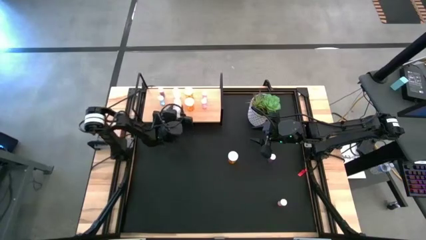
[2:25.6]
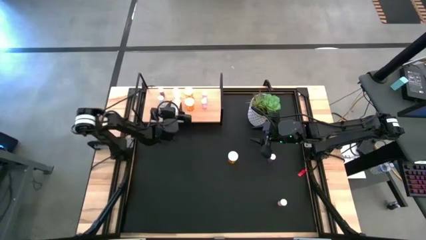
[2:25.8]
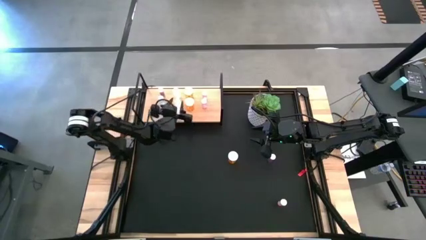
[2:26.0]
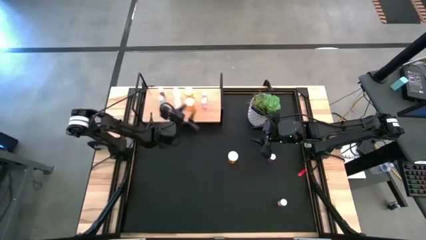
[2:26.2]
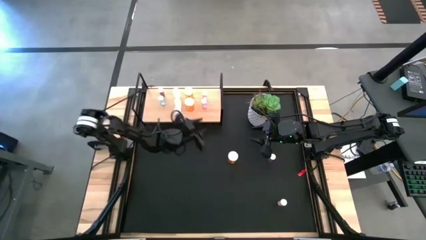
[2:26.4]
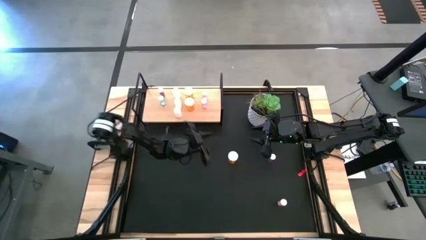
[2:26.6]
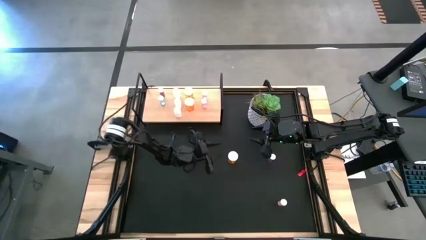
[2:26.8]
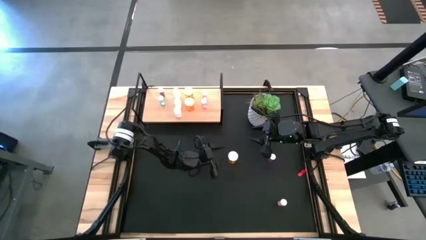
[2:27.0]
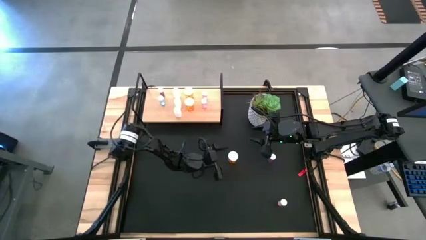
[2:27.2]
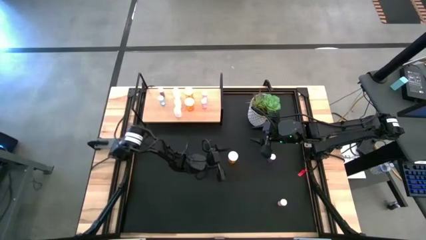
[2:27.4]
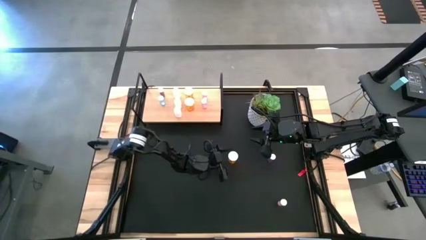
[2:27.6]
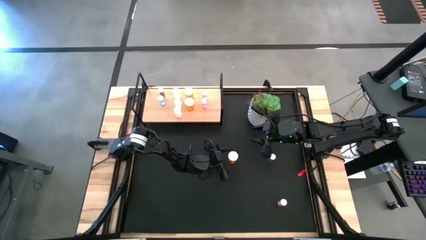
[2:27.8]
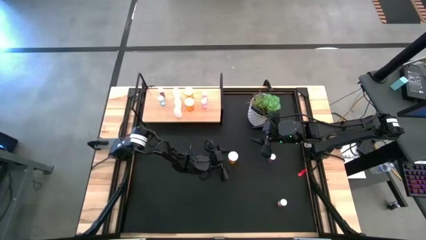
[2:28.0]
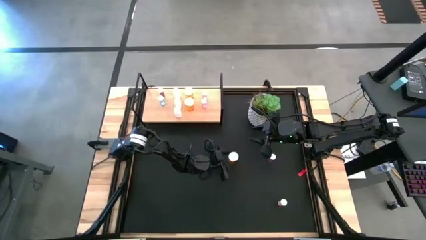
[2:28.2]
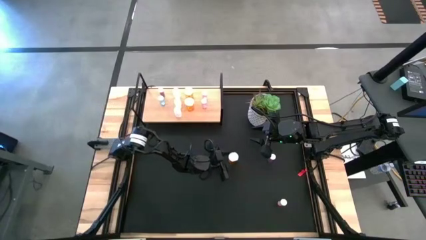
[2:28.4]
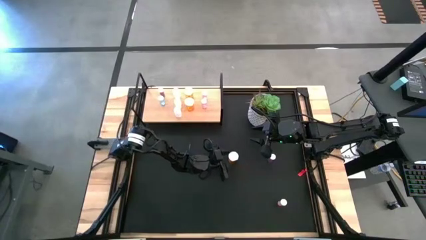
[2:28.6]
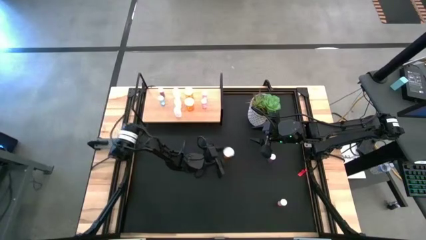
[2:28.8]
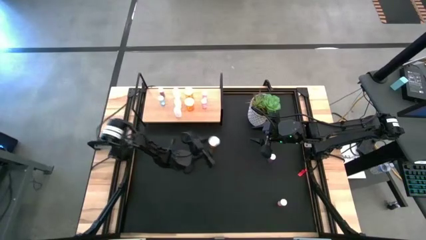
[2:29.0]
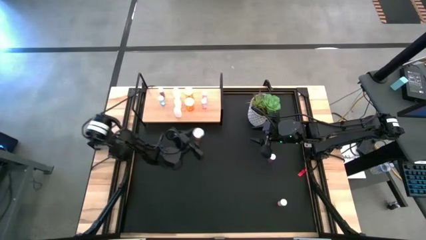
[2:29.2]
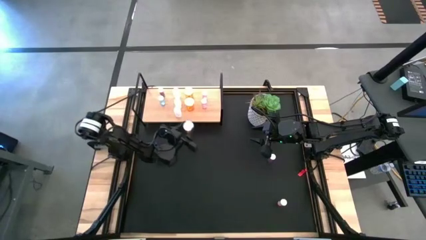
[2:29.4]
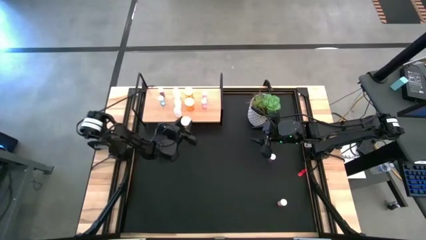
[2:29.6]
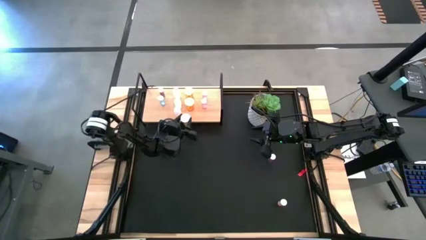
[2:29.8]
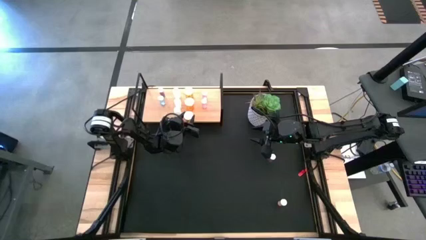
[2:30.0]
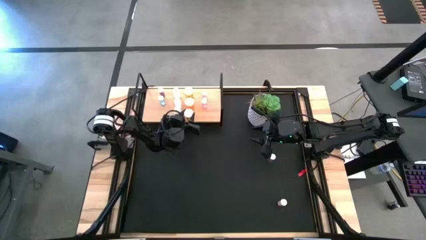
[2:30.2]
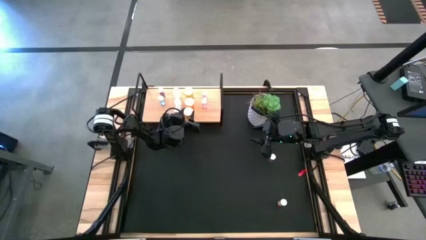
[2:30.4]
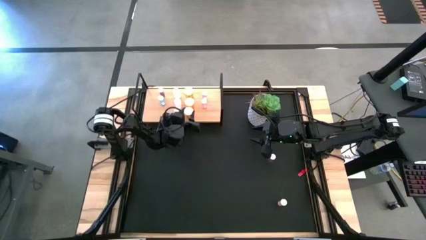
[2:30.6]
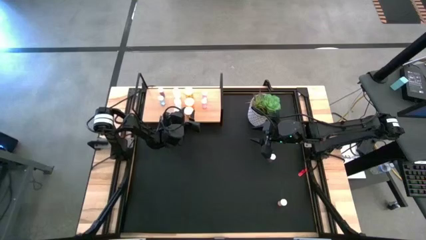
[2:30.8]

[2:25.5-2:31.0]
Task: Pick and place medicine bottles onto shelf by color
Put the orange pill bottle on the shelf aligned with the other orange pill bottles

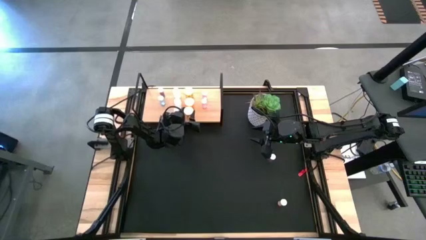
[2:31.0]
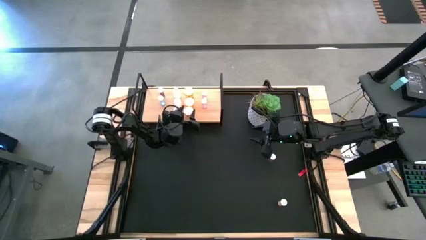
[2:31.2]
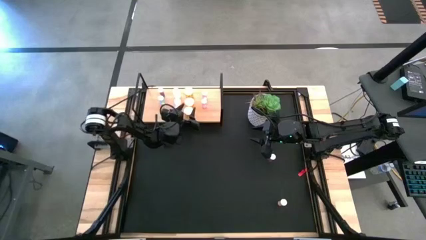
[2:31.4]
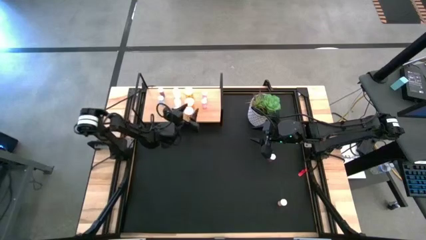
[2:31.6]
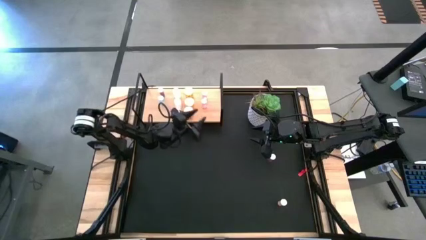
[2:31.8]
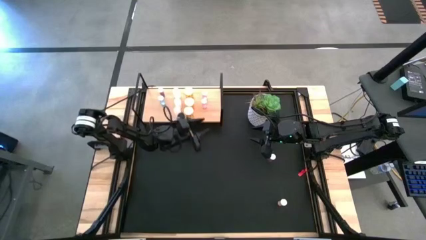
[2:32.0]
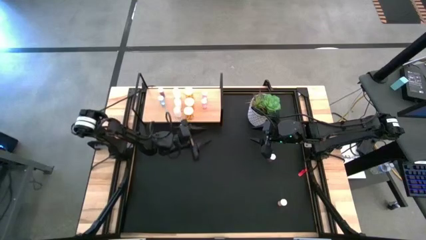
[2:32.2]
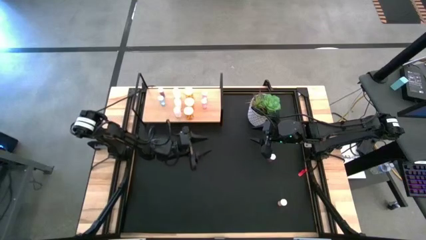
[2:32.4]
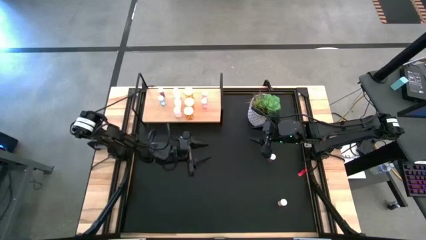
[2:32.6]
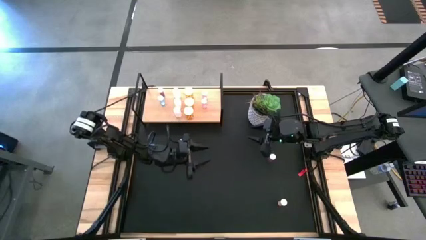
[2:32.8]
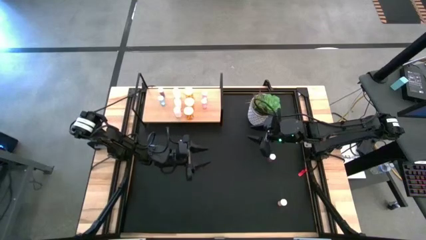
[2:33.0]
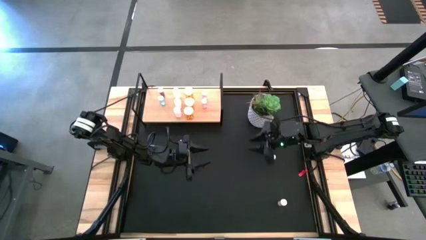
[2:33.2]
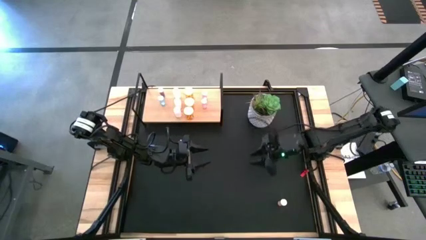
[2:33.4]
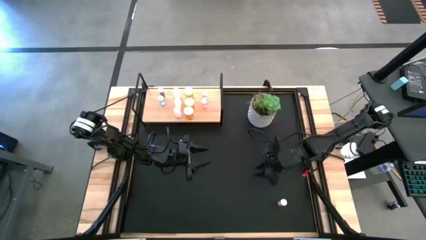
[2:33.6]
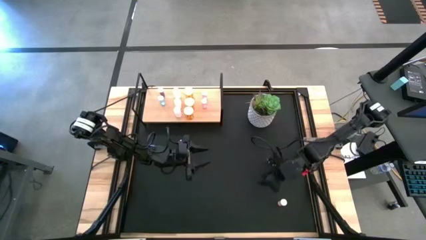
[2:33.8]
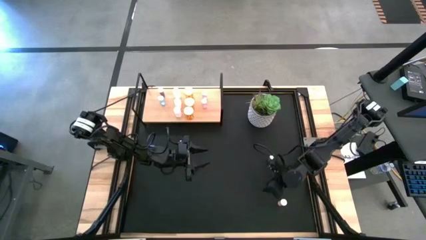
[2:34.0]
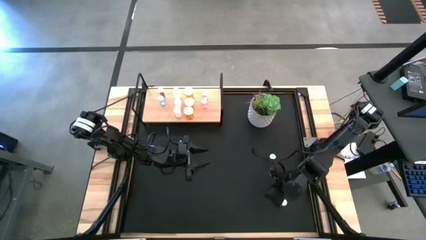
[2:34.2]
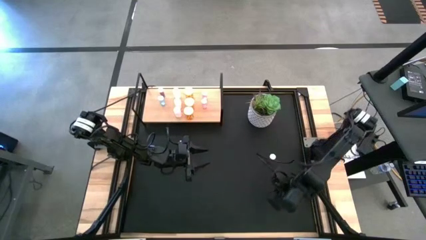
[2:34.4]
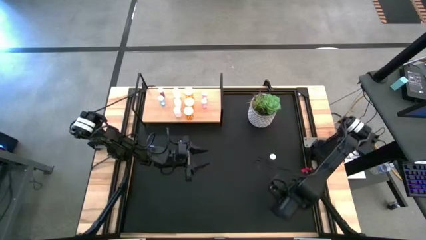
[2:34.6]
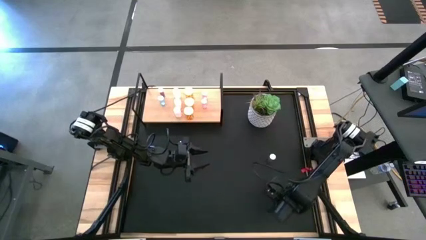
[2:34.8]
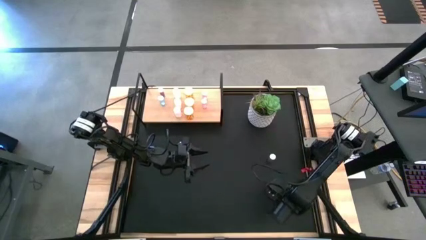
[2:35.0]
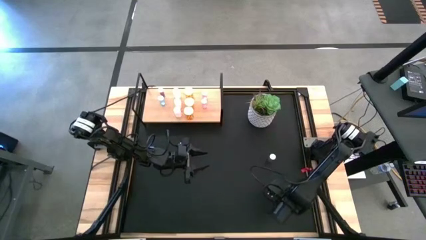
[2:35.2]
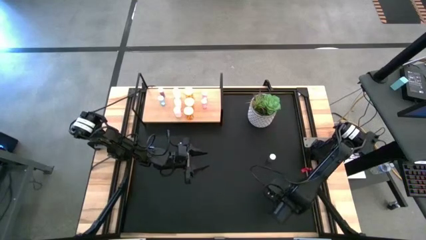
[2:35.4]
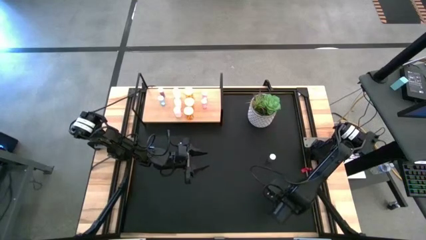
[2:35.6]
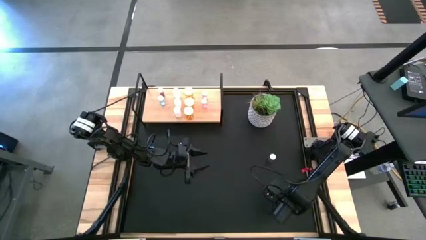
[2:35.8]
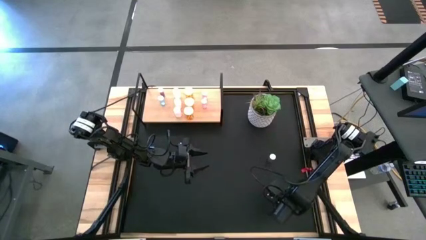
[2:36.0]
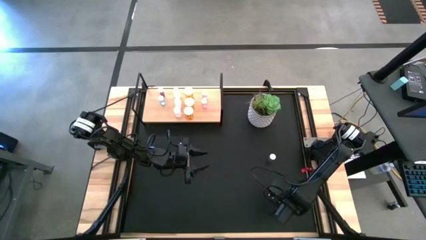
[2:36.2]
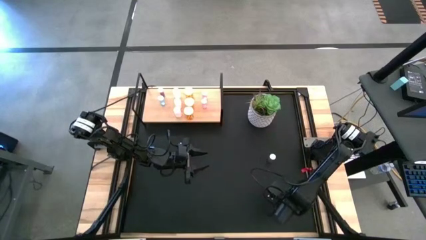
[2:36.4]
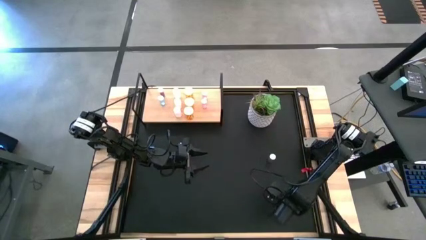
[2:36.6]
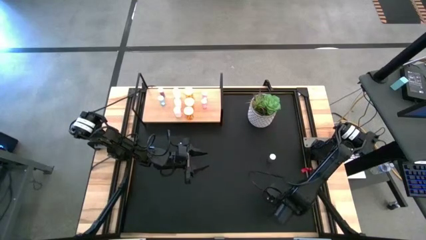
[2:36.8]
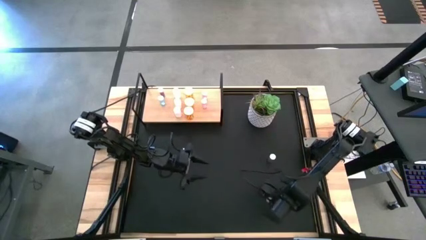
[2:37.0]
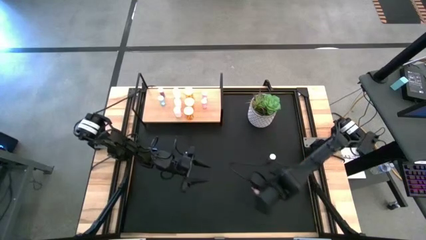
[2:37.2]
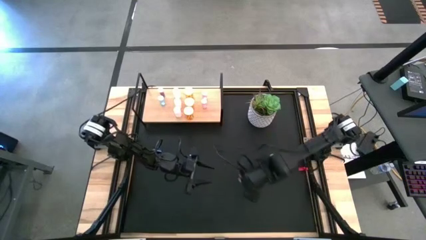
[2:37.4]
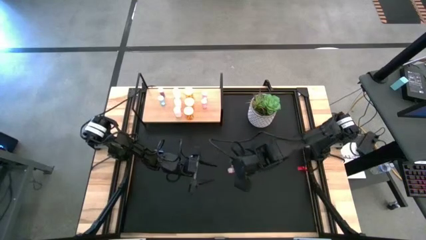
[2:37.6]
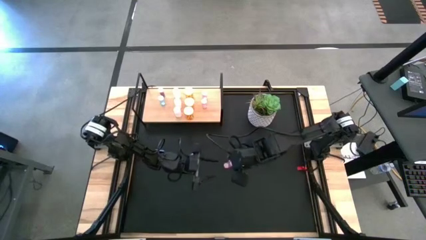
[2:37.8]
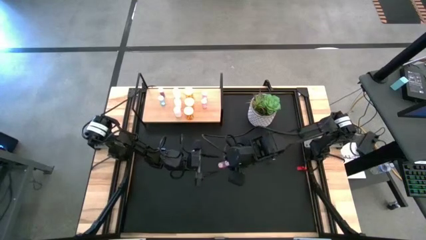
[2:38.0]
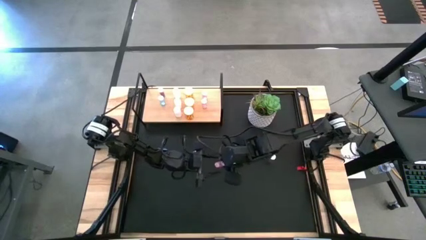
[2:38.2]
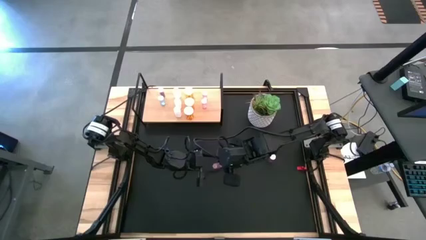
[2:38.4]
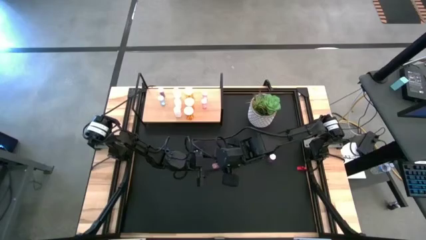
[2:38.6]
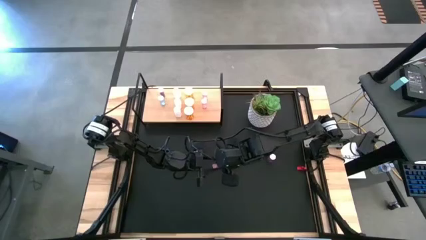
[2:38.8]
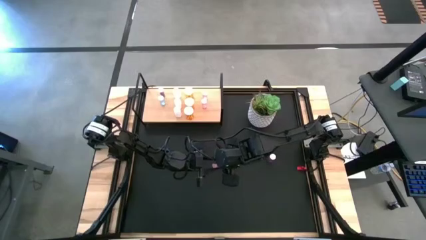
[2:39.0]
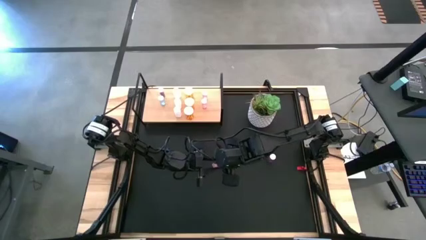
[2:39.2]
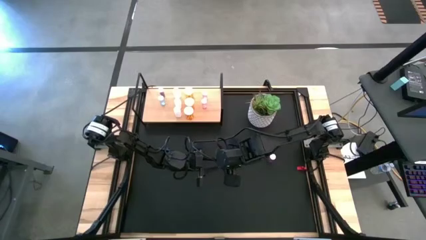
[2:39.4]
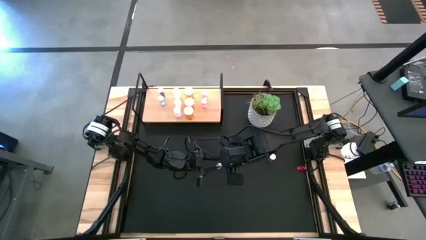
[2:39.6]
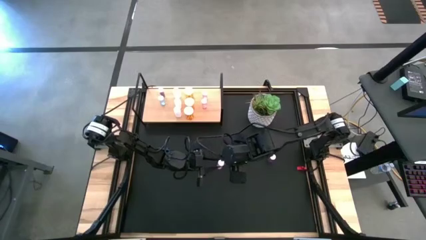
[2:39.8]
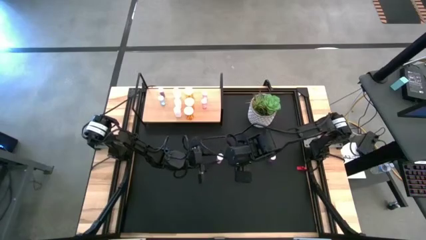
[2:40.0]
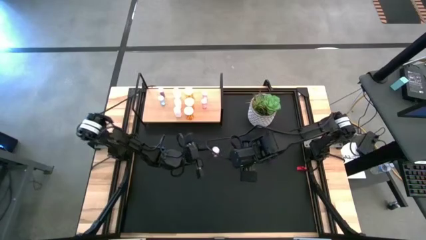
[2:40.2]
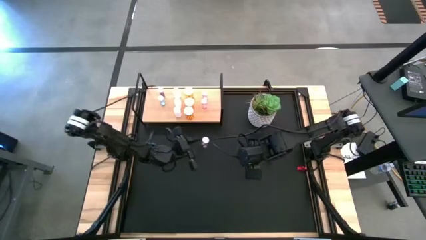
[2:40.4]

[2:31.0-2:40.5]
Put the pink pill bottle on the shelf aligned with the other pink pill bottles
